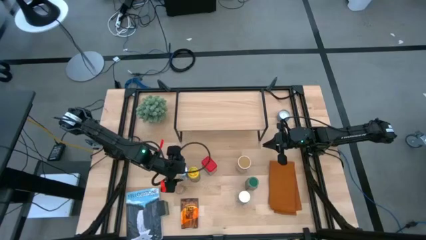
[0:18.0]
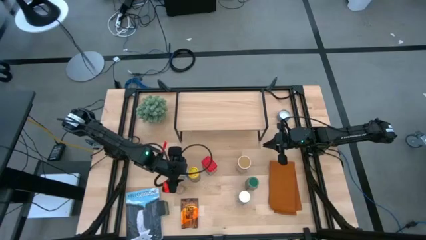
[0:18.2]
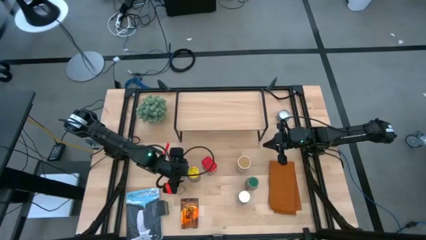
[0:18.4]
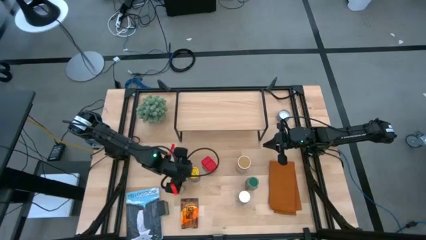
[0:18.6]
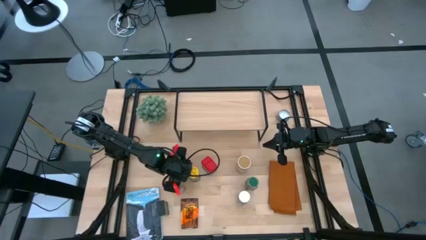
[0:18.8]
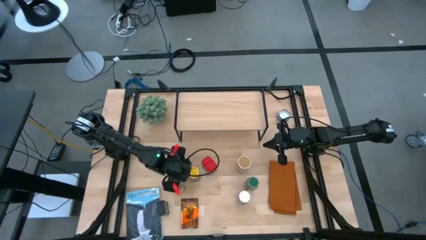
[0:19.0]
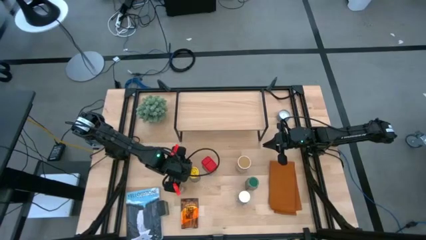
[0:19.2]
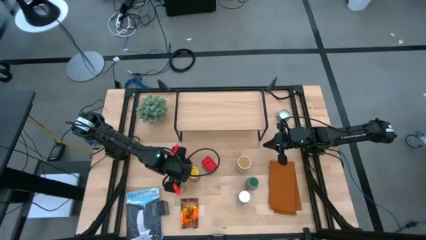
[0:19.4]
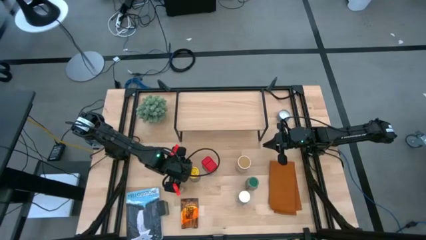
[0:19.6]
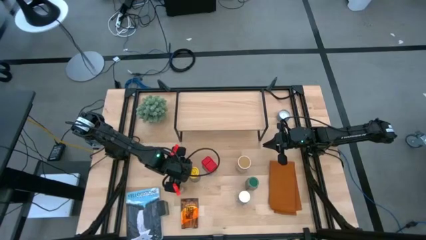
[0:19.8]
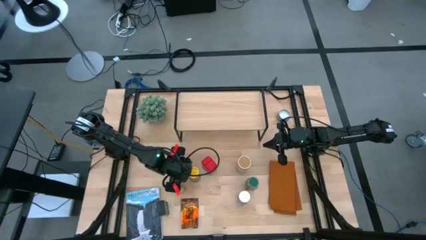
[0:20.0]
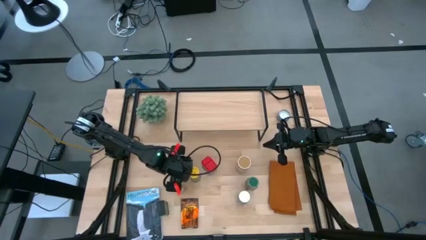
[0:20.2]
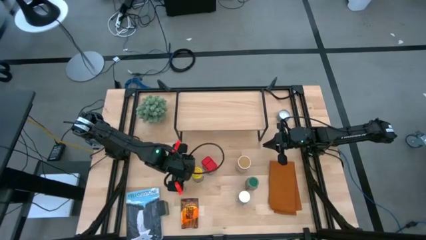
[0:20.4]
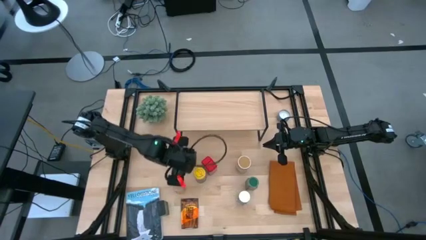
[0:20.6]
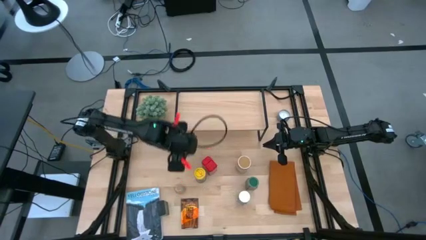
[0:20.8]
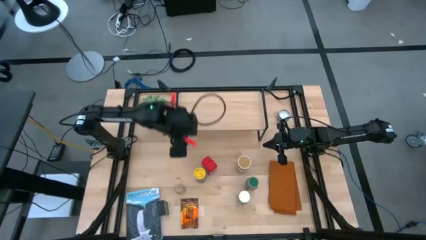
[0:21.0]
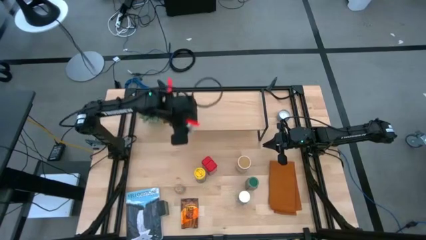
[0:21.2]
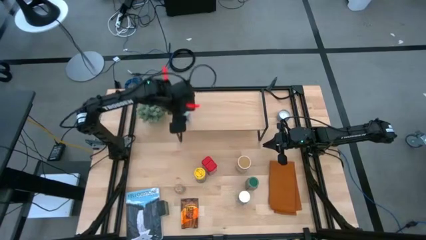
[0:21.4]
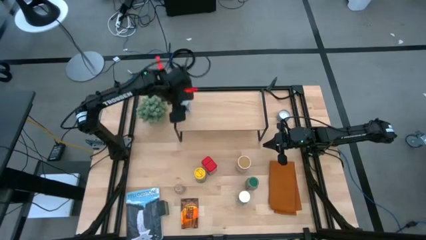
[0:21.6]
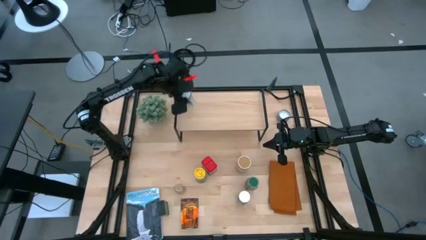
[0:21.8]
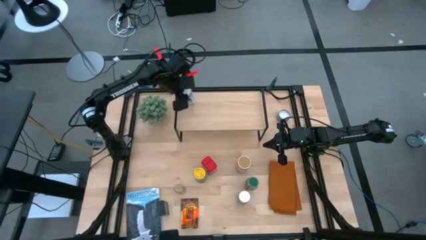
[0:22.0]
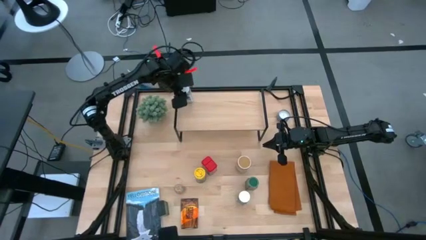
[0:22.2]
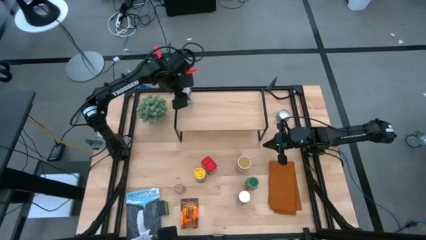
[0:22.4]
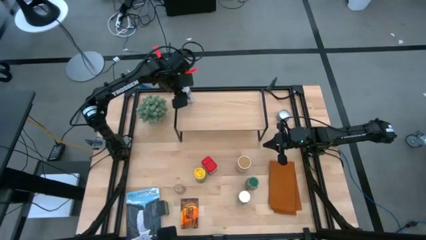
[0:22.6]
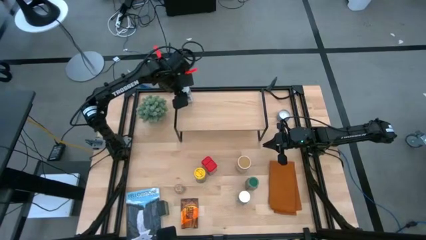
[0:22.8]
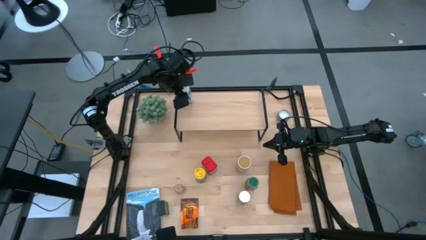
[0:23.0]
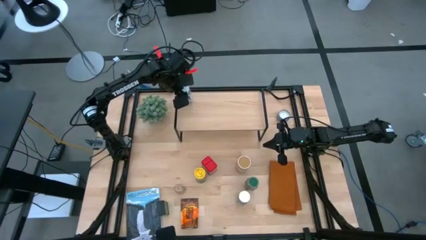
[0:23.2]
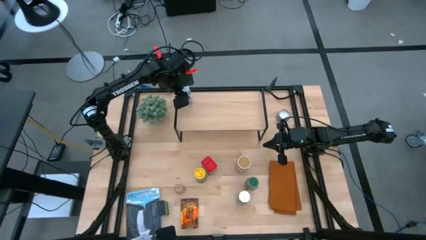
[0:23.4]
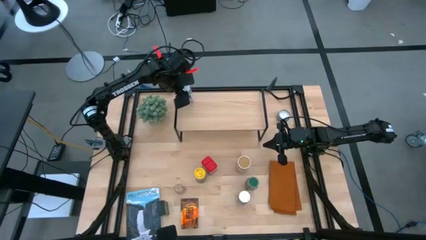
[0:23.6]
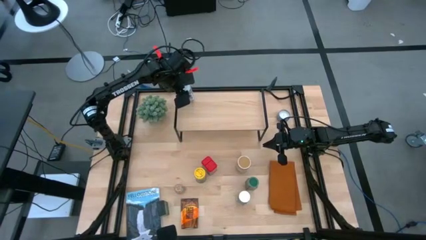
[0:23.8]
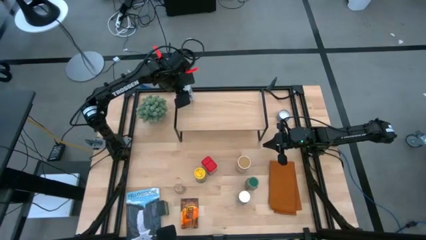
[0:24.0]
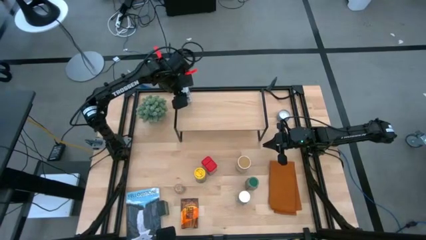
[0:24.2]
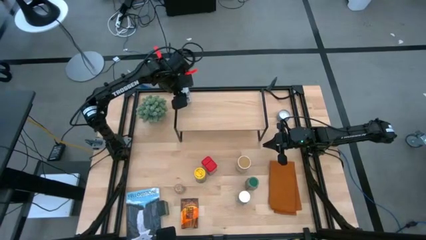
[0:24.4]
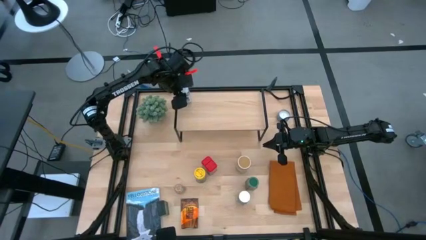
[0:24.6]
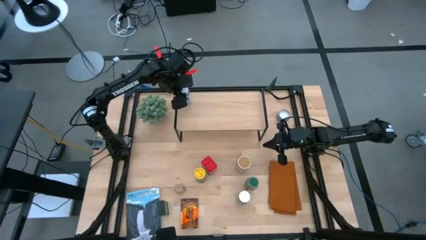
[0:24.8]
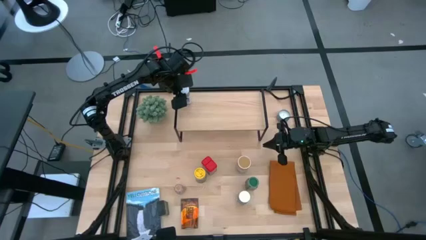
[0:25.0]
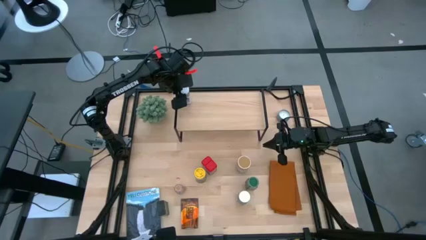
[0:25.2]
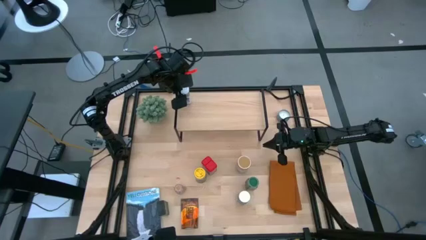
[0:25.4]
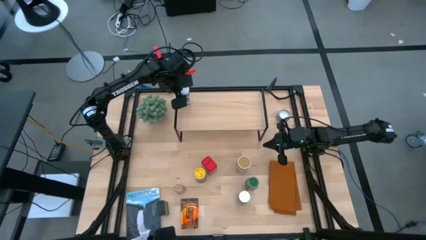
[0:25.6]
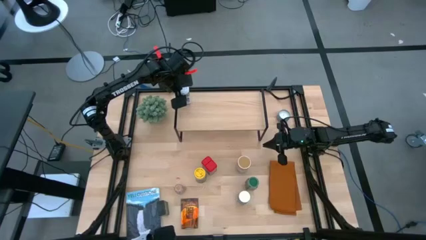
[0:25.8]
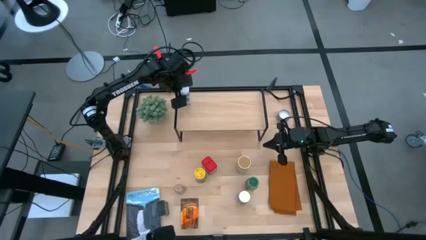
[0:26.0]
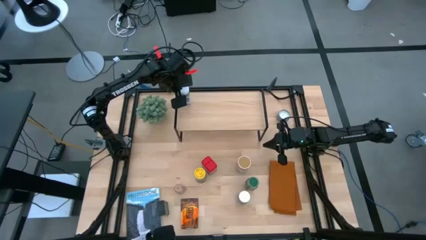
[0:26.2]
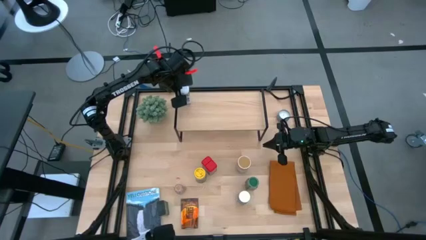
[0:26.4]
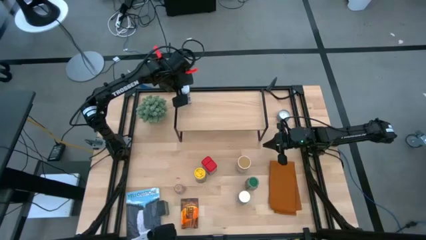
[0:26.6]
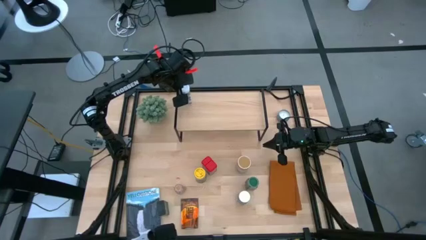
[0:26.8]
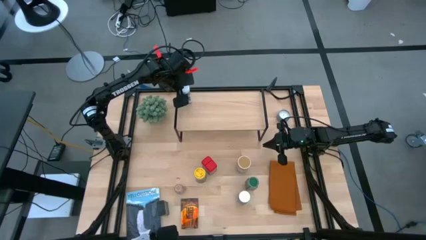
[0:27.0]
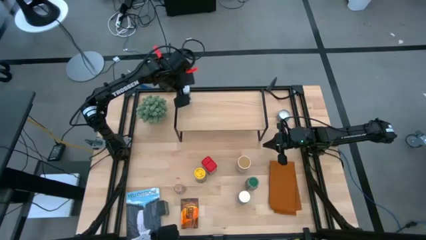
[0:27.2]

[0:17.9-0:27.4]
Task: Shelf spices
Put the white seasoning bottle onto the shelf

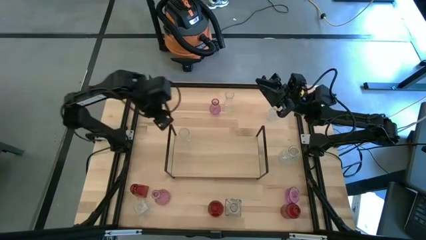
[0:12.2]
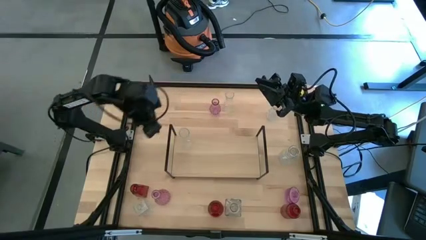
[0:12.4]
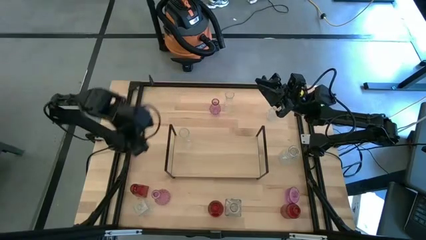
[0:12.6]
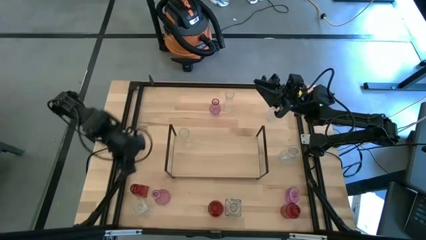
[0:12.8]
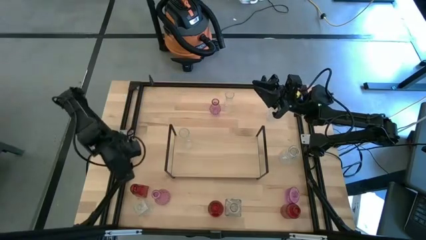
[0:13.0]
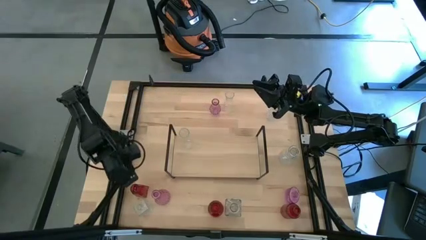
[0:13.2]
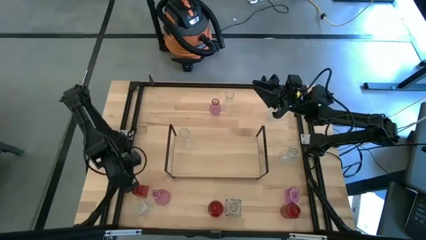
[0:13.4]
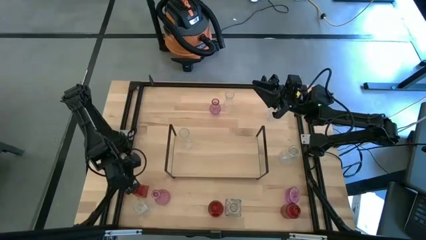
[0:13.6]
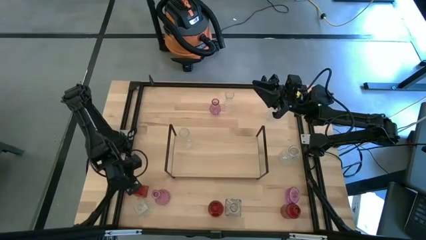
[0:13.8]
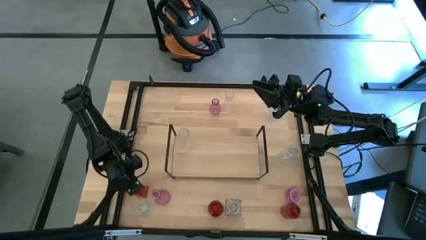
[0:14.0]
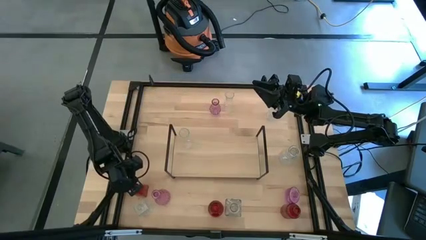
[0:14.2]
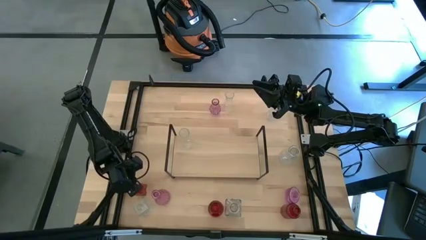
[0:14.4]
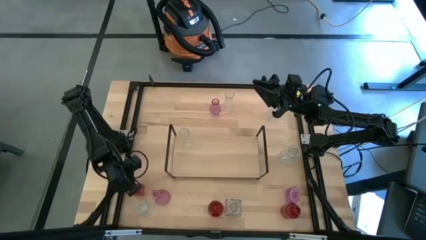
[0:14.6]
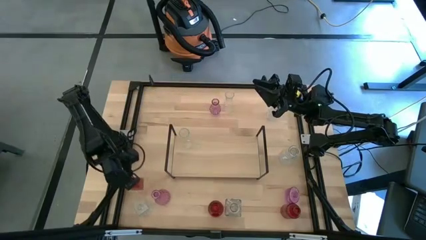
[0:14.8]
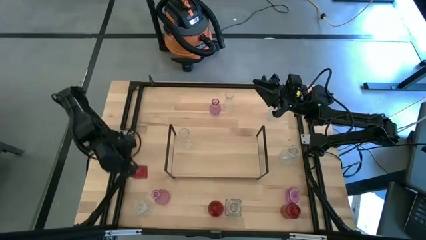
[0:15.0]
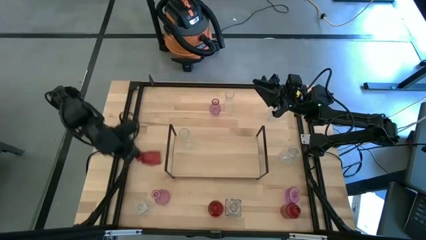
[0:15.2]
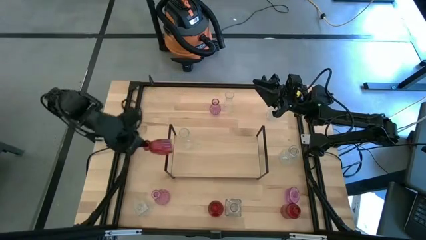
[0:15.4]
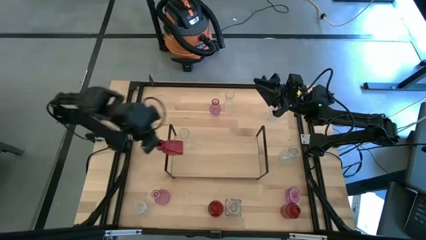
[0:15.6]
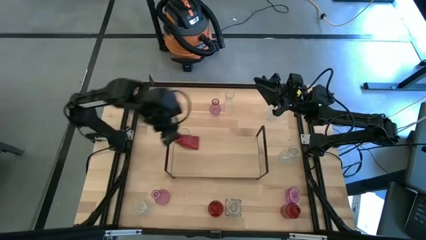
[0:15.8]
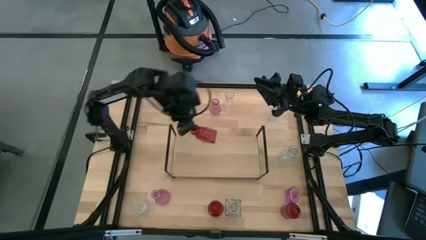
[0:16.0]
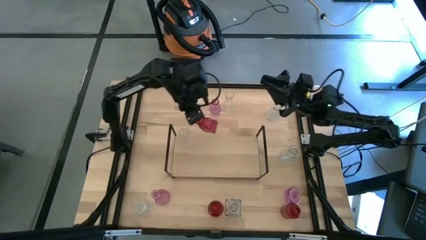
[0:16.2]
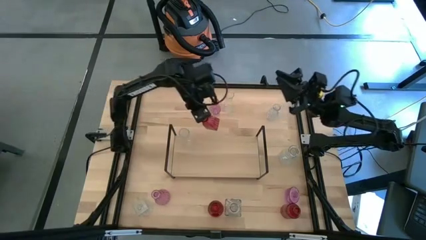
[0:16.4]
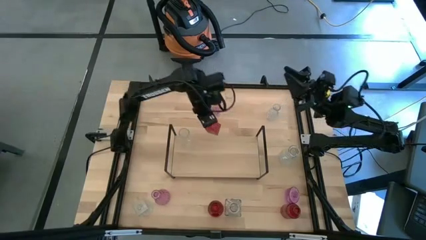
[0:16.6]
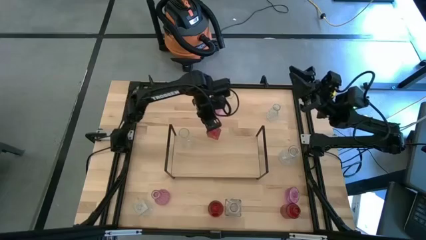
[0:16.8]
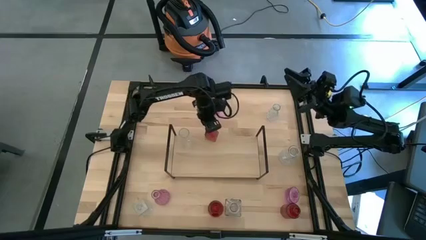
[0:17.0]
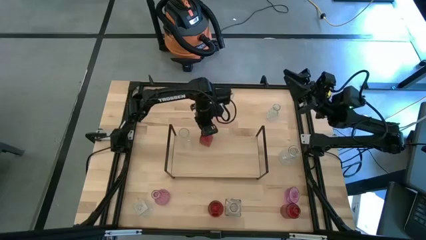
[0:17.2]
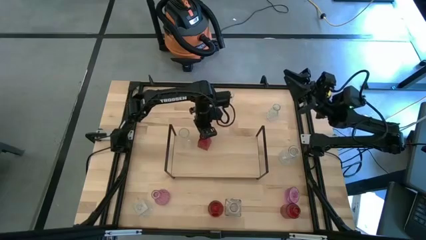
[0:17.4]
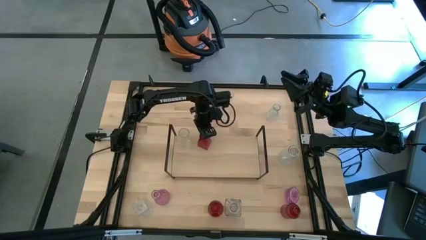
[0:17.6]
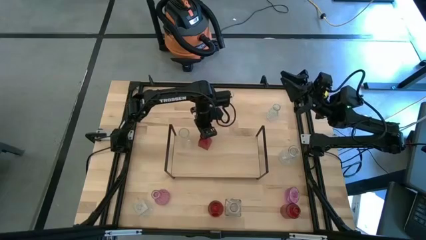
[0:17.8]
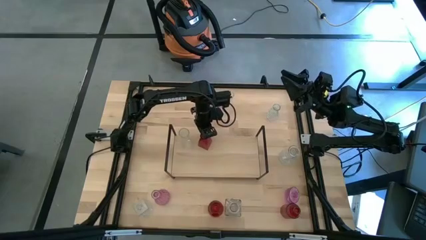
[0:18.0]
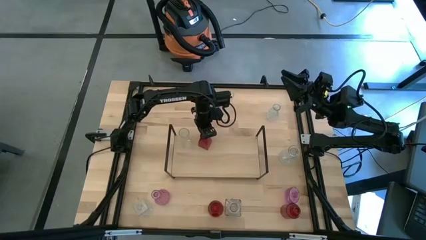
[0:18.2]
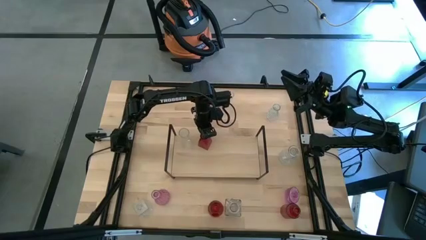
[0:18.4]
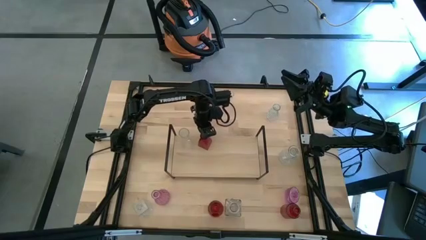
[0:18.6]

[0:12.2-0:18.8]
Task: sort vases onto shelf
Put the bottom left red flower vase on the shelf
